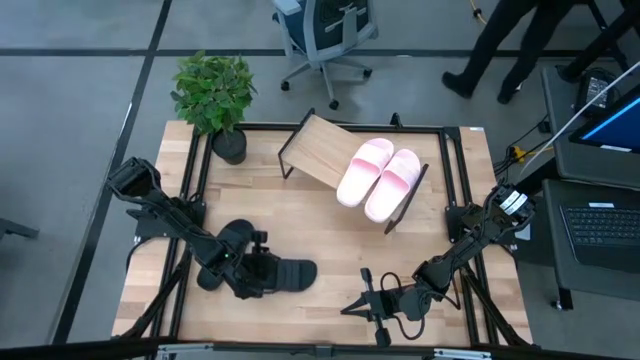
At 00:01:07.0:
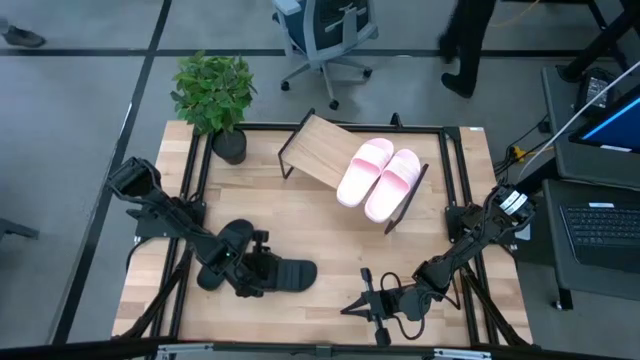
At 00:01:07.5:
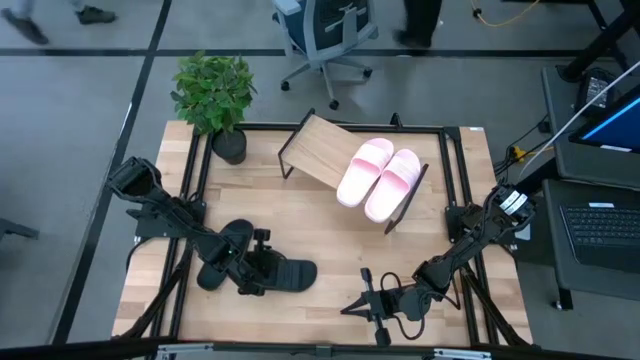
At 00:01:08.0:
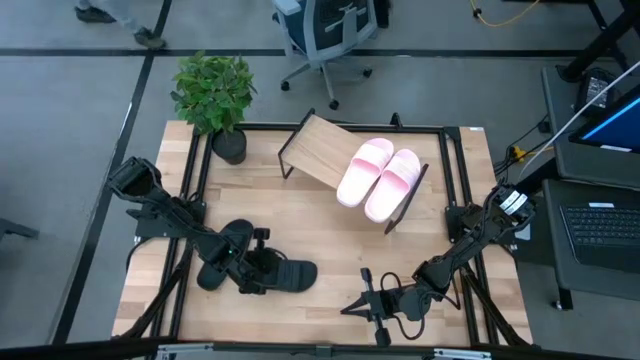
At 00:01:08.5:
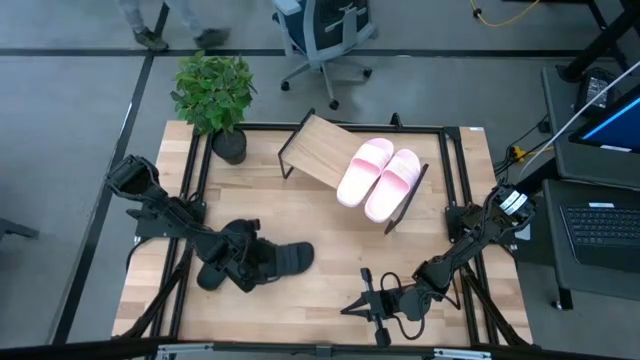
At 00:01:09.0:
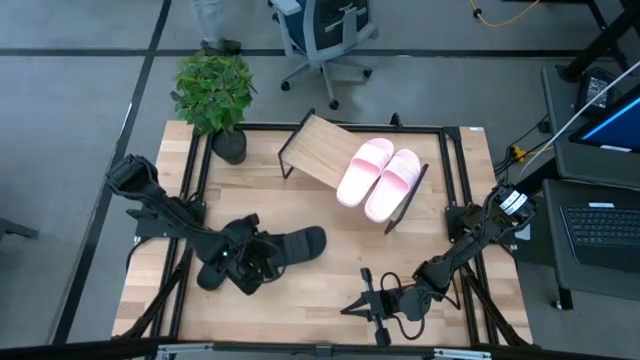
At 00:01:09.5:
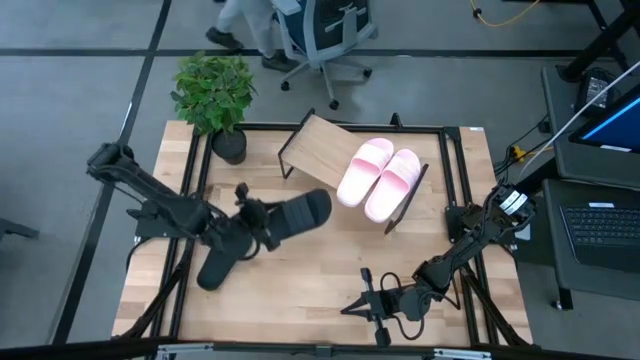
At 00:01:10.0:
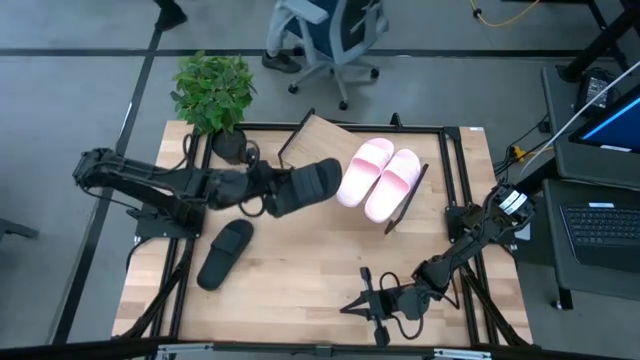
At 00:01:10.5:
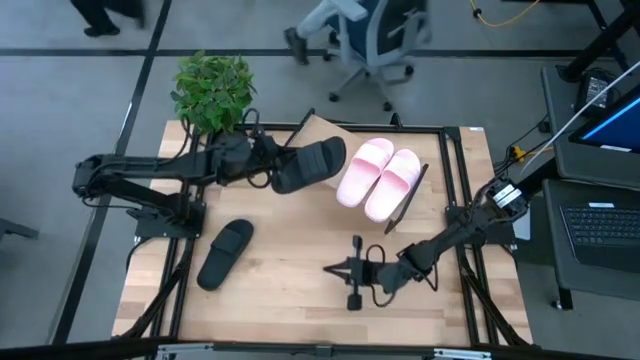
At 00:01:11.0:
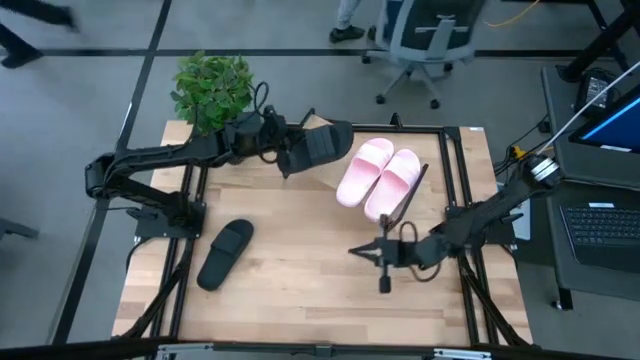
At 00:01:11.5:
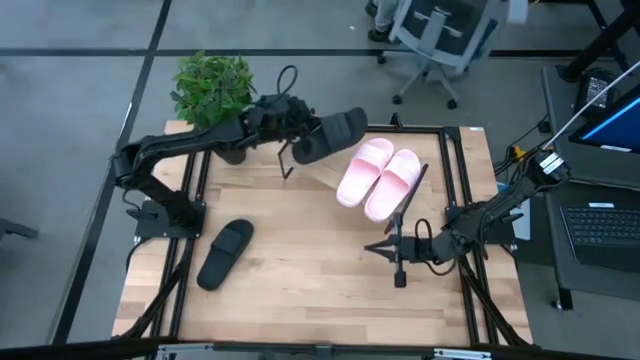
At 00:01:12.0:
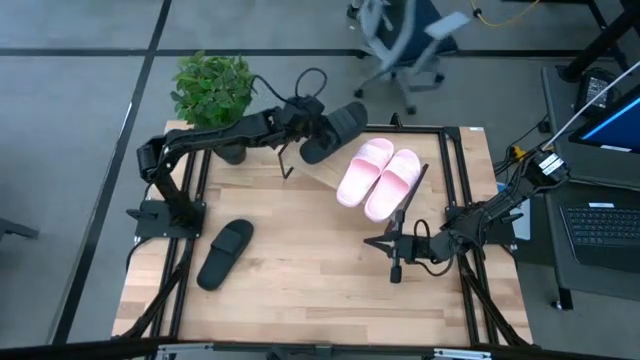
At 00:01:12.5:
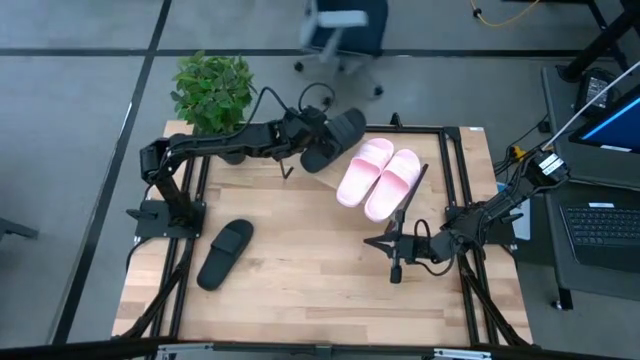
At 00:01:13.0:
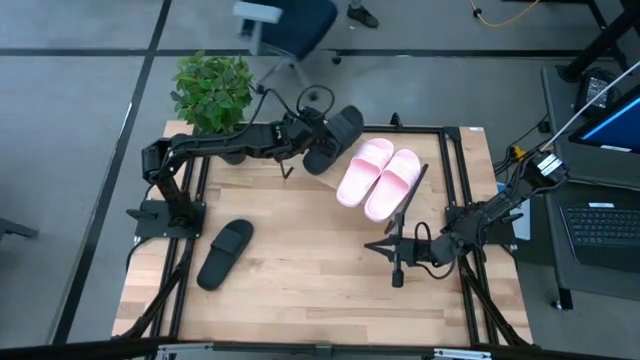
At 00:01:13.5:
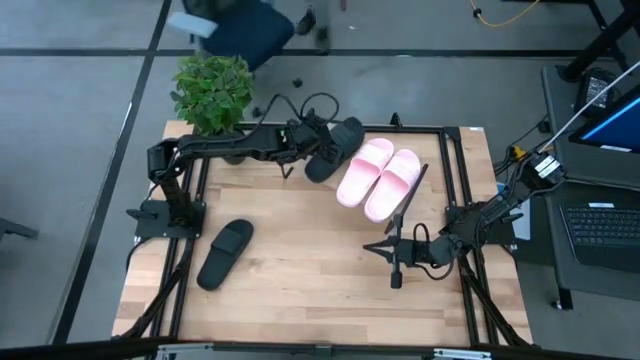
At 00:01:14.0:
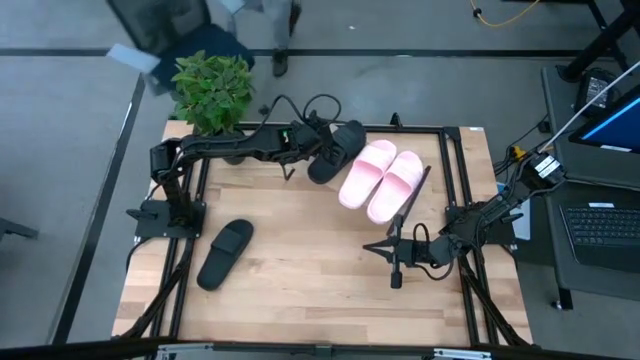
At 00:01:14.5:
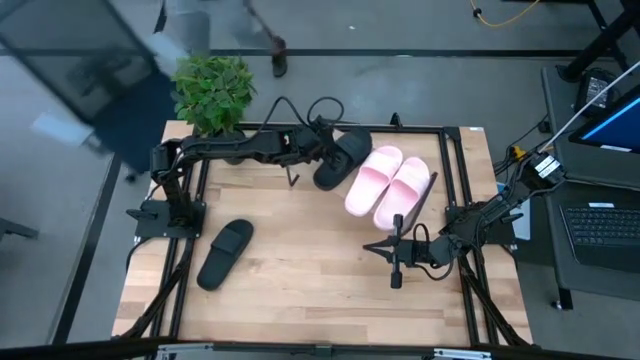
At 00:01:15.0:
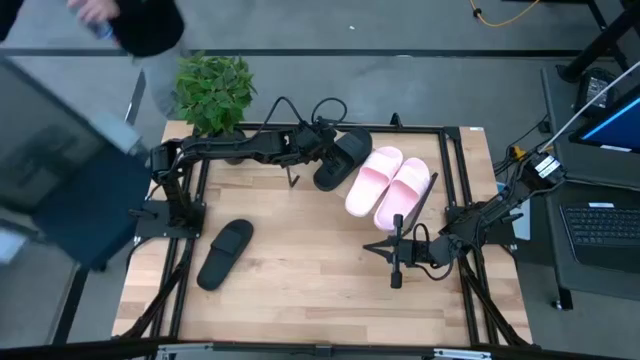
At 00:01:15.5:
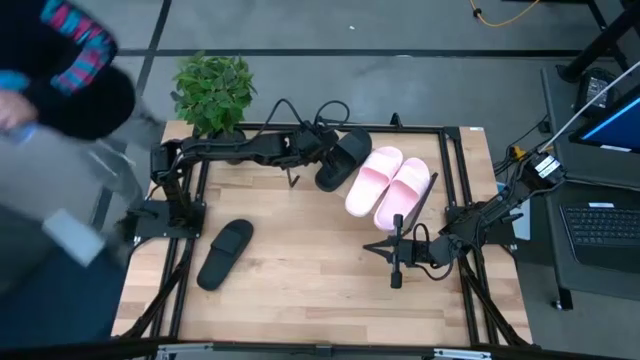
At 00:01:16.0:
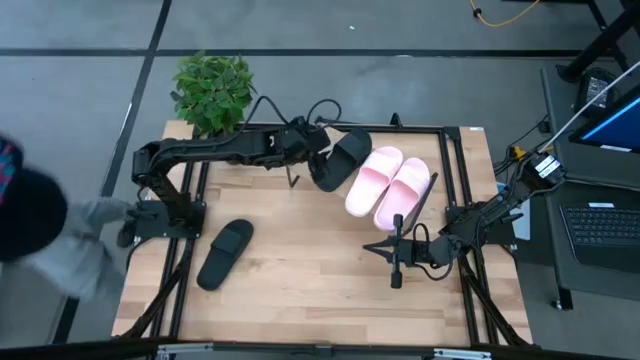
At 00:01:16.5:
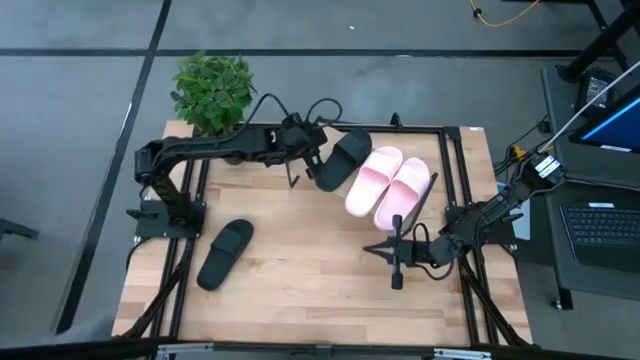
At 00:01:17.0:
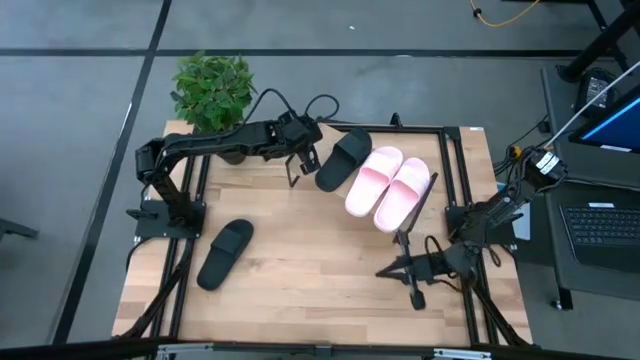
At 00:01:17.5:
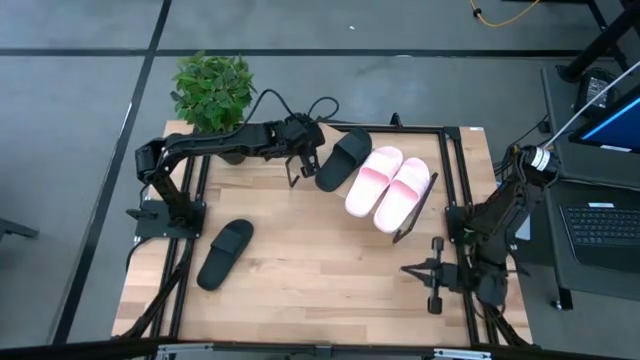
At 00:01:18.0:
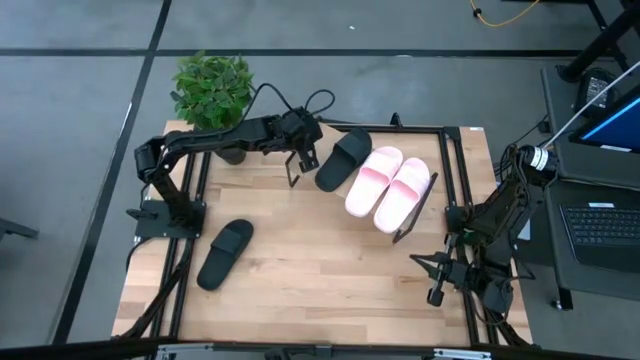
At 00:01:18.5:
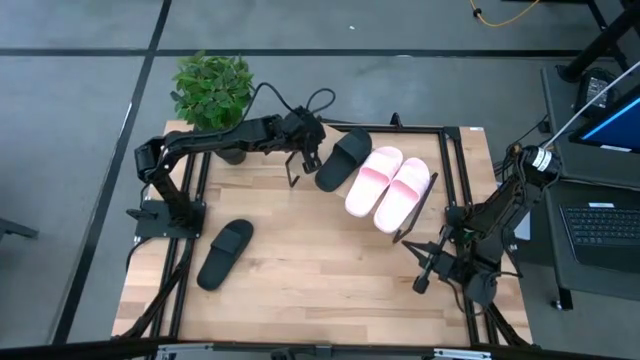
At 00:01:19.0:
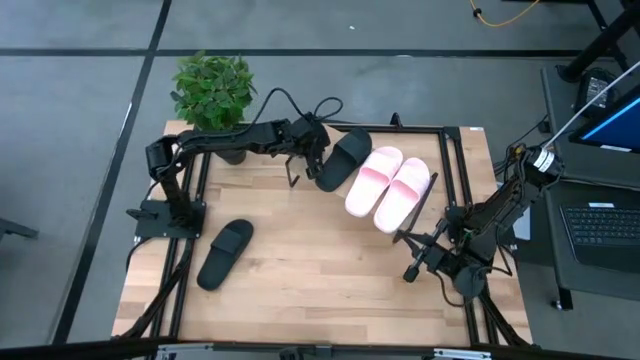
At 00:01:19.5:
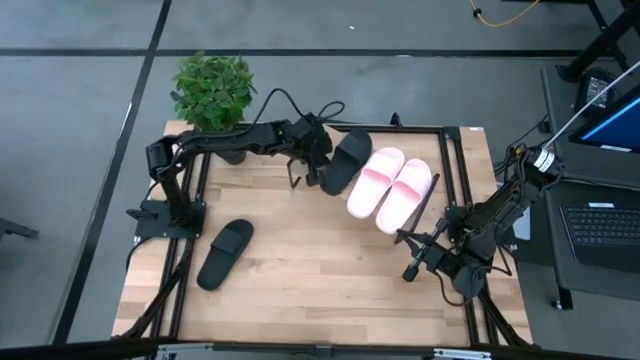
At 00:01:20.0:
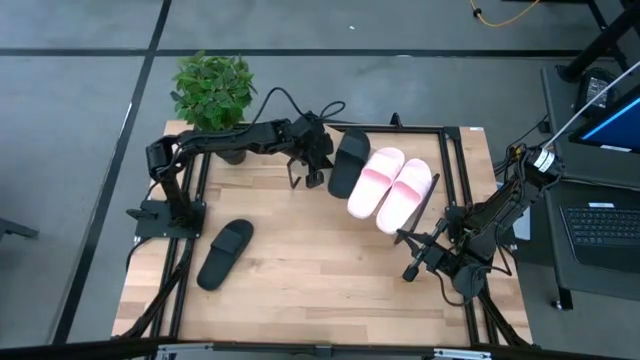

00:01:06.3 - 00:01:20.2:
Task: Pick and place slides into the shelf
Put the right black slide on the shelf

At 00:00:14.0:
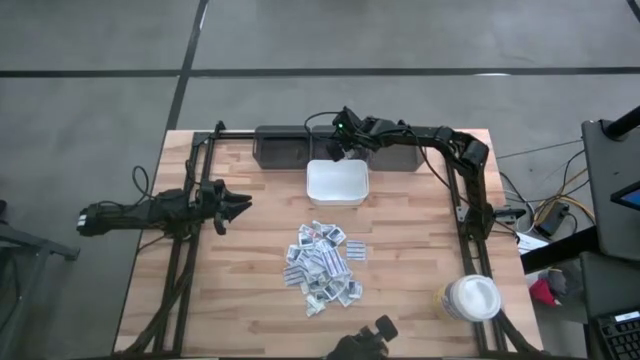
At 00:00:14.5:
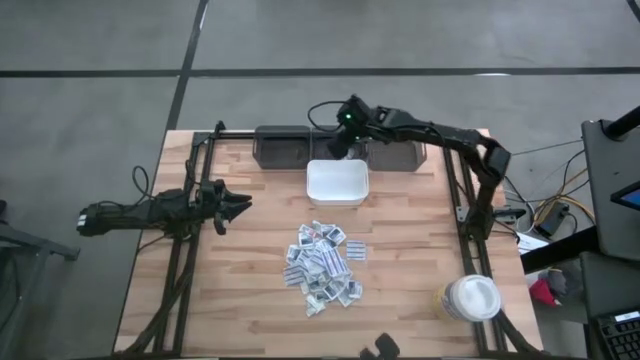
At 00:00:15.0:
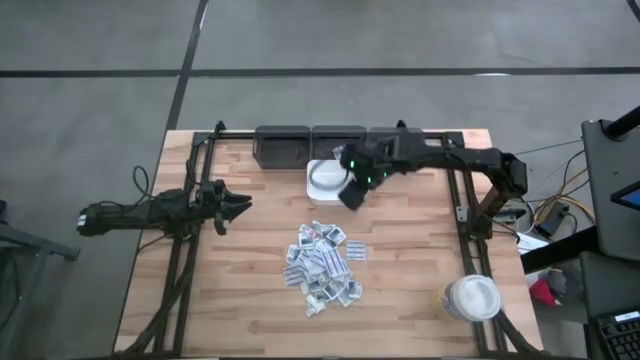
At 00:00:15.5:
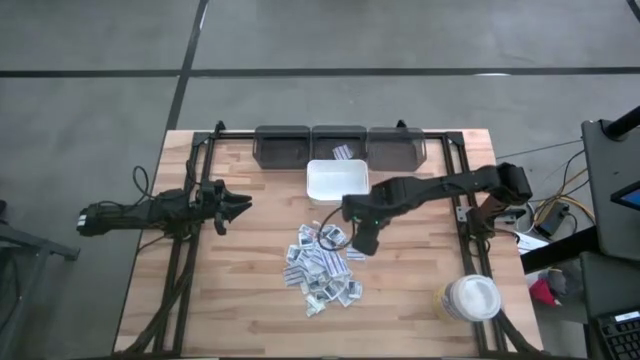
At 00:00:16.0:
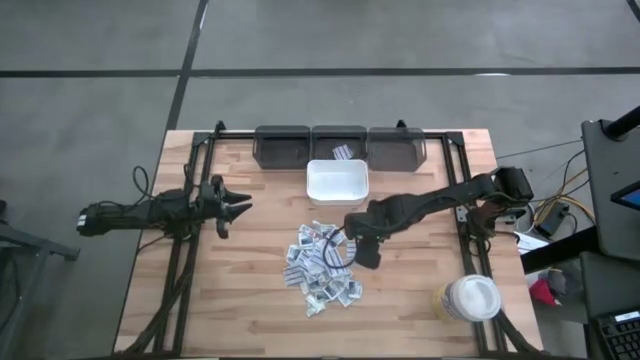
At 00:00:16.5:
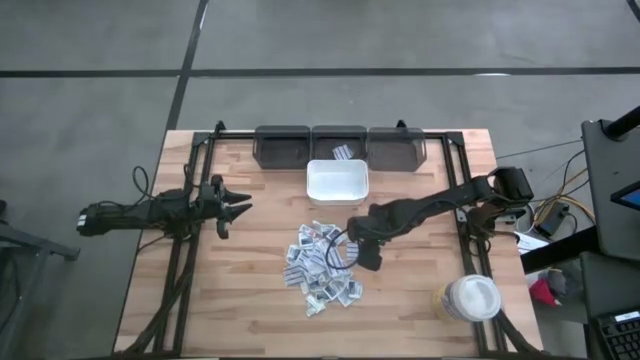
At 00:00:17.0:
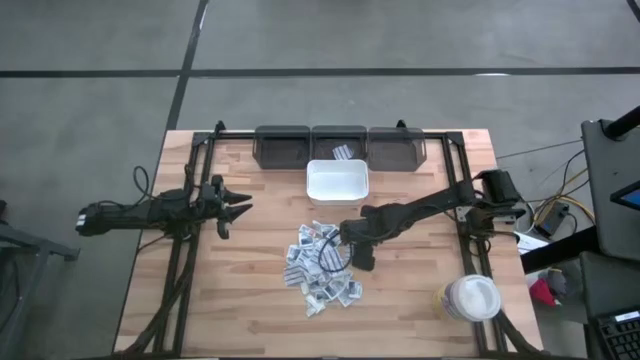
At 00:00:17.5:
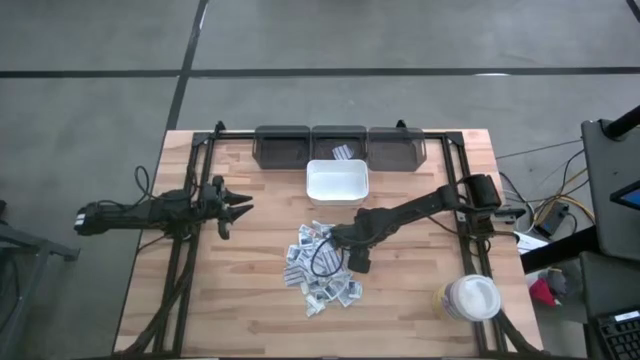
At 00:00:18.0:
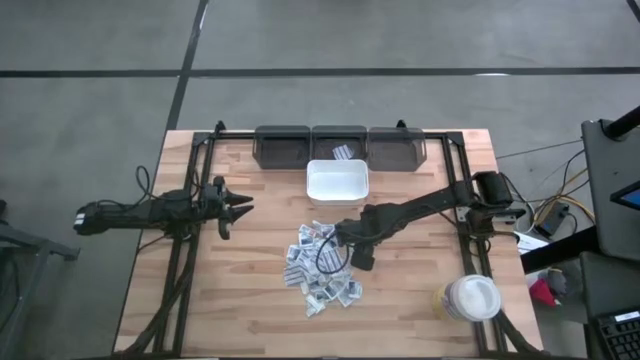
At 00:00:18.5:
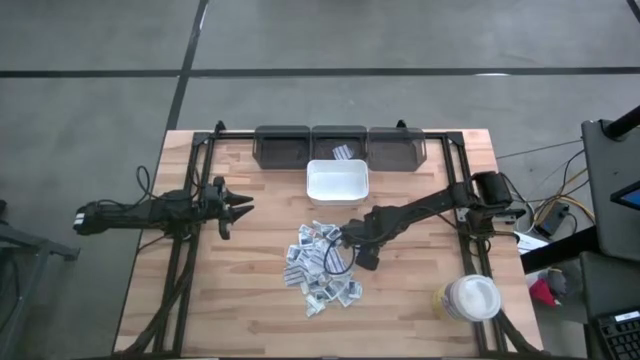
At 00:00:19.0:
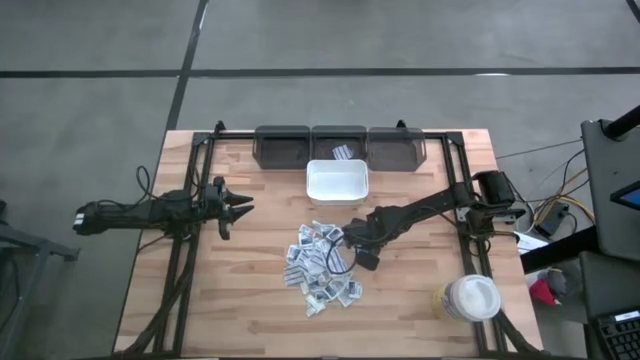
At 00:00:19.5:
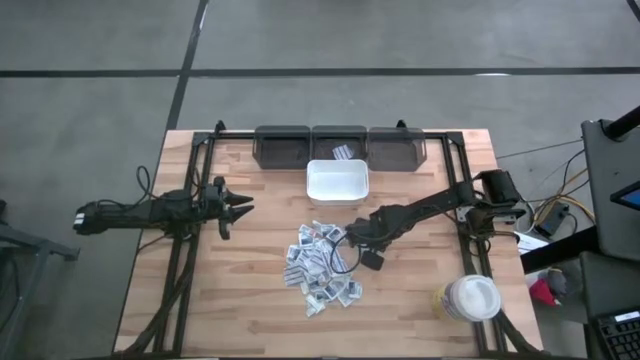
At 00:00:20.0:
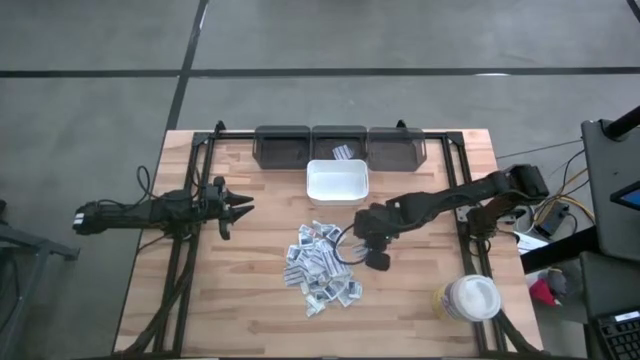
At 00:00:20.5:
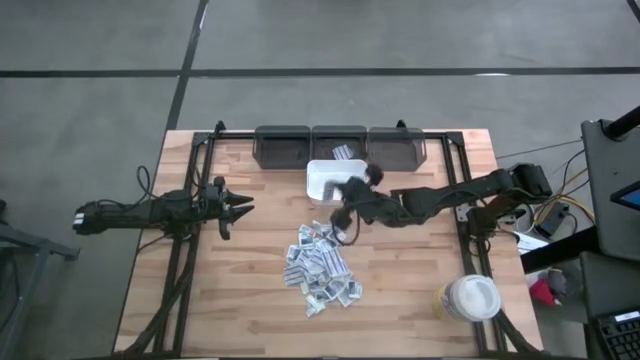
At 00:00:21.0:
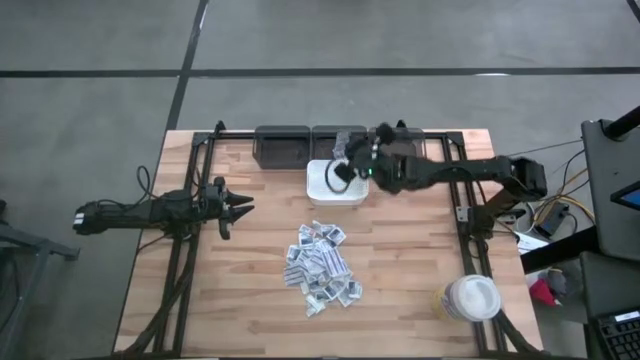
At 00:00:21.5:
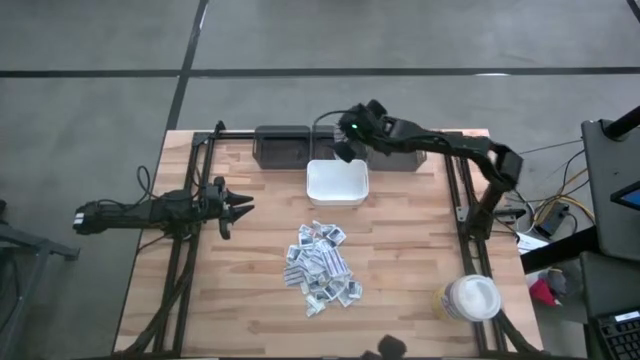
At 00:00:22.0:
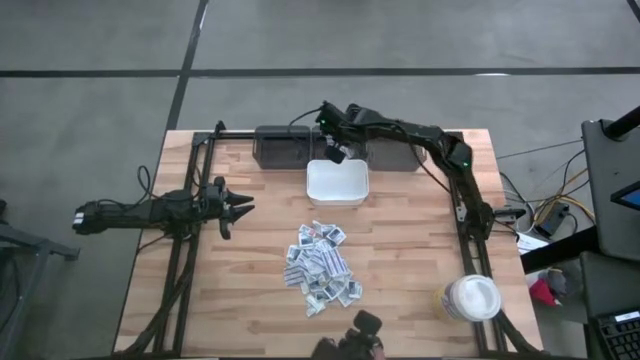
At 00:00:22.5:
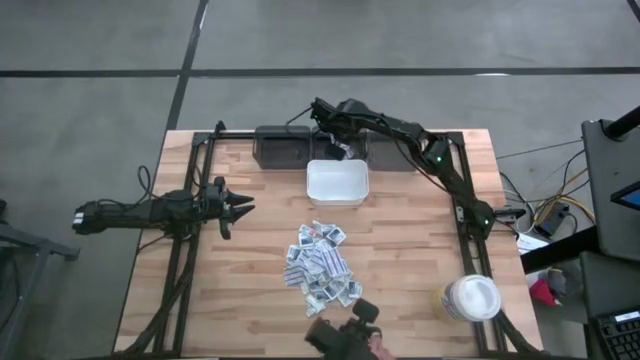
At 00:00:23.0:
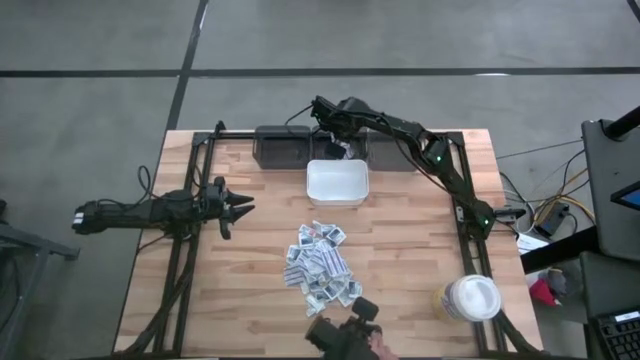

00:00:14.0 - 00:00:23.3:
Task: Pick & Place First Aid Supplies
Put the blue bandage into the middle black bin
